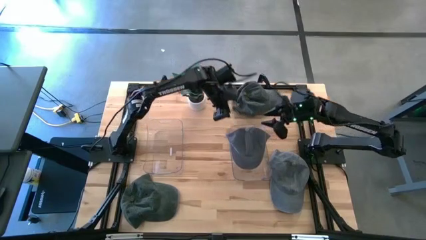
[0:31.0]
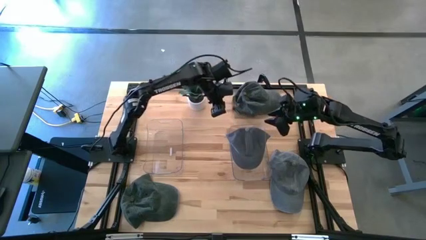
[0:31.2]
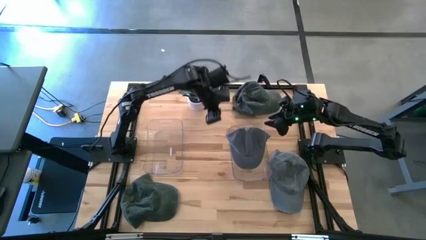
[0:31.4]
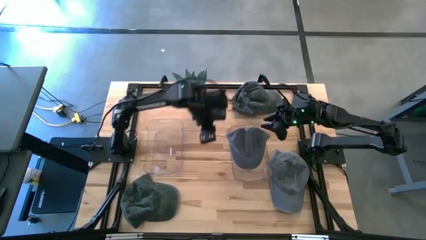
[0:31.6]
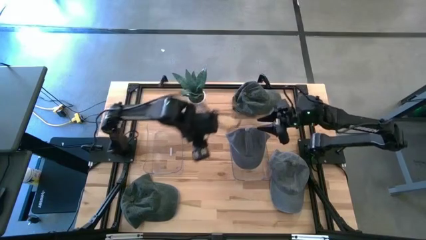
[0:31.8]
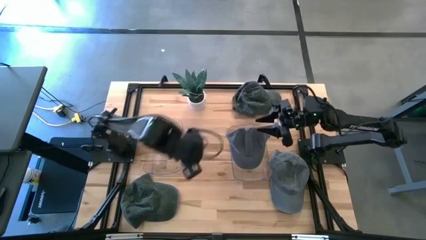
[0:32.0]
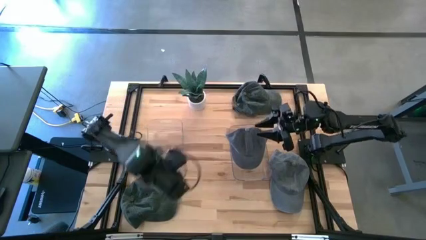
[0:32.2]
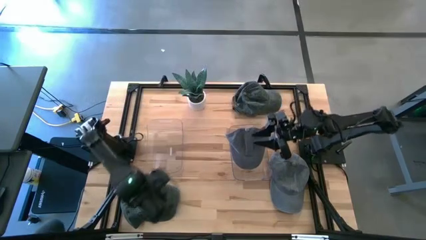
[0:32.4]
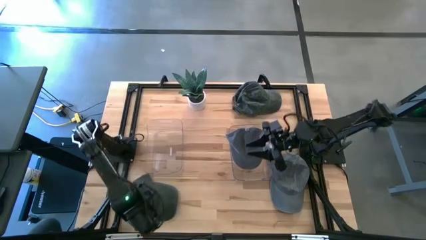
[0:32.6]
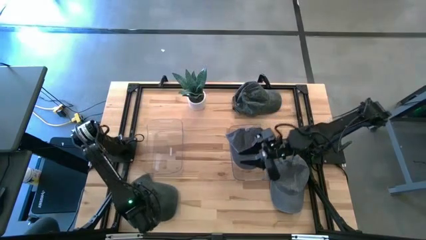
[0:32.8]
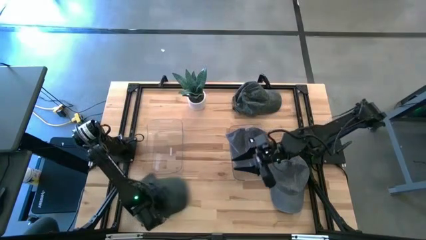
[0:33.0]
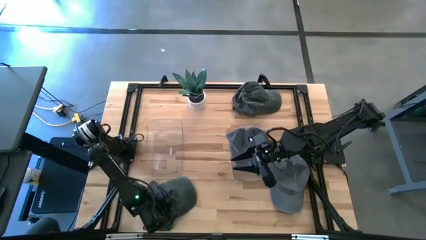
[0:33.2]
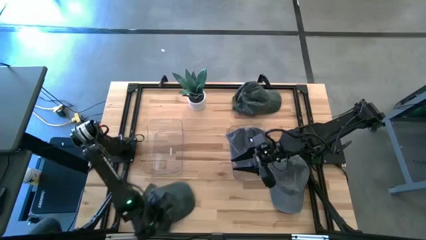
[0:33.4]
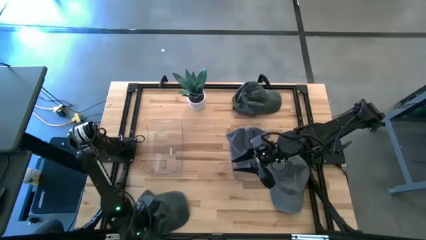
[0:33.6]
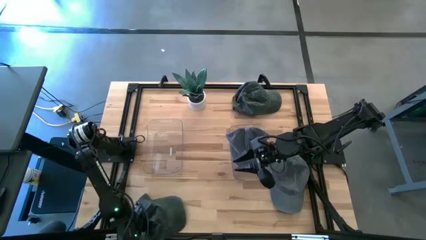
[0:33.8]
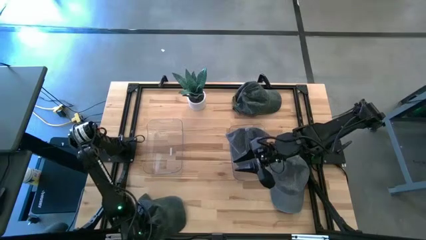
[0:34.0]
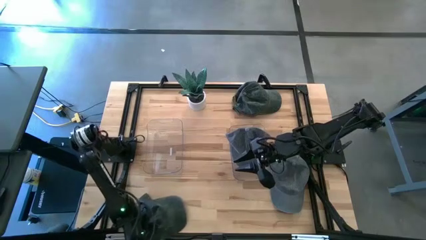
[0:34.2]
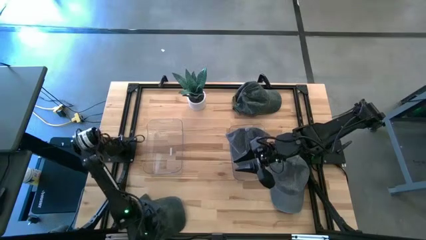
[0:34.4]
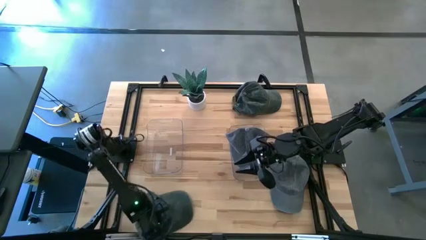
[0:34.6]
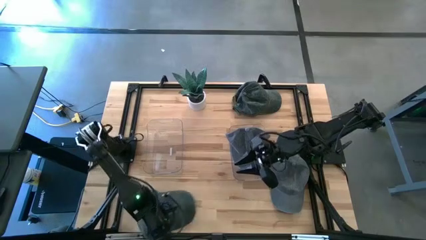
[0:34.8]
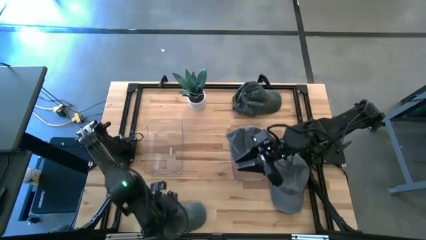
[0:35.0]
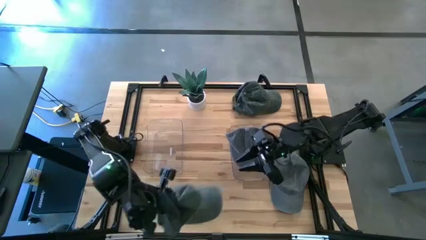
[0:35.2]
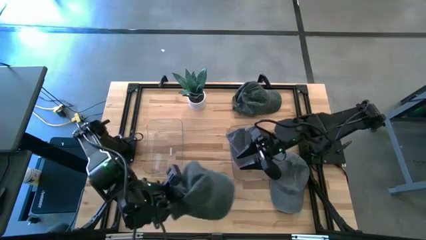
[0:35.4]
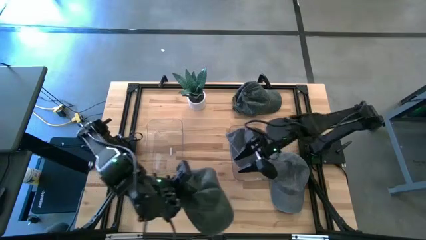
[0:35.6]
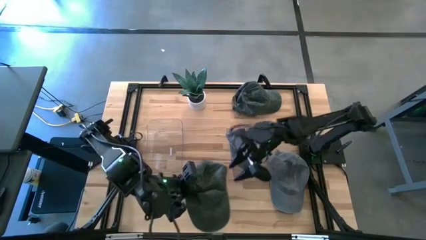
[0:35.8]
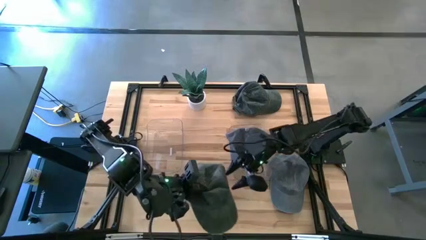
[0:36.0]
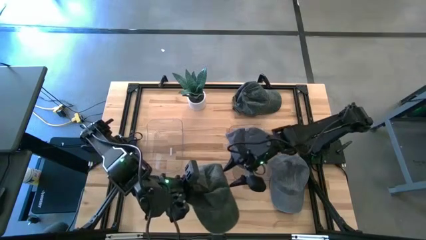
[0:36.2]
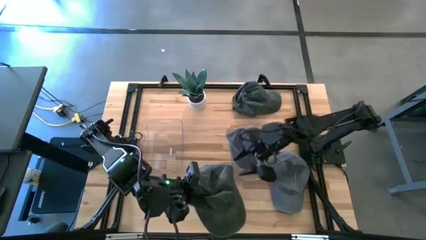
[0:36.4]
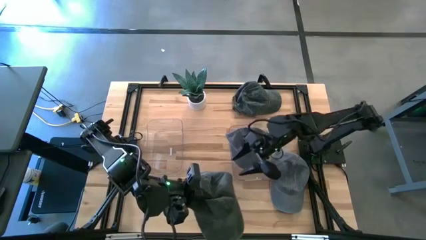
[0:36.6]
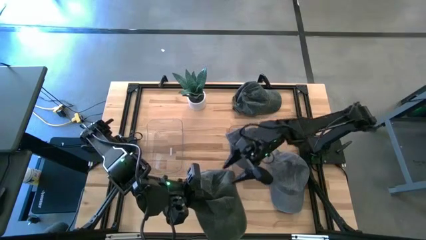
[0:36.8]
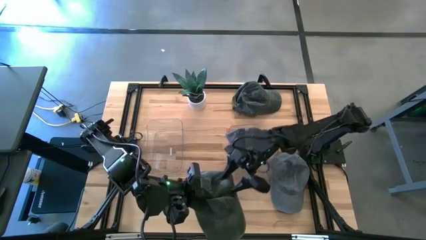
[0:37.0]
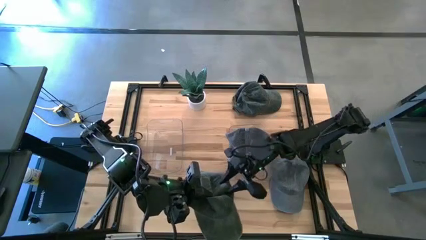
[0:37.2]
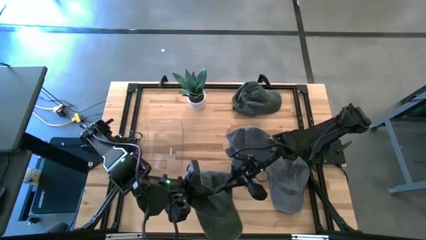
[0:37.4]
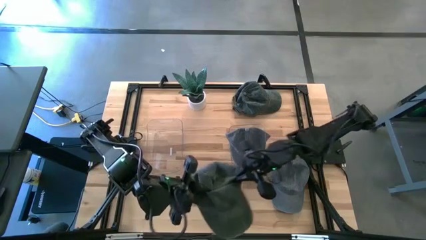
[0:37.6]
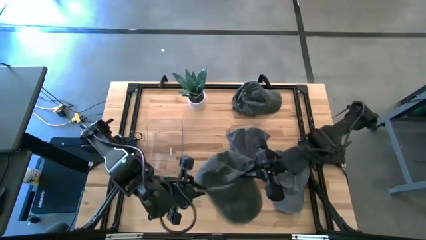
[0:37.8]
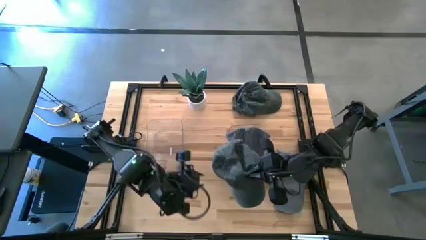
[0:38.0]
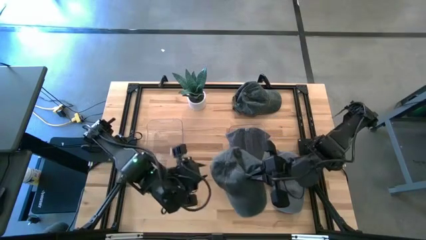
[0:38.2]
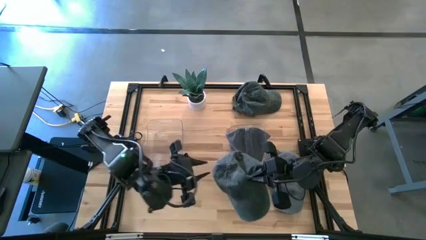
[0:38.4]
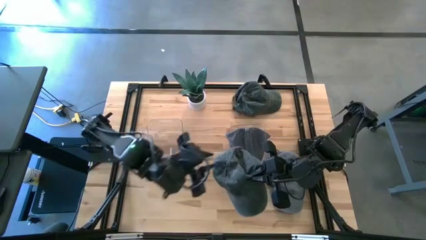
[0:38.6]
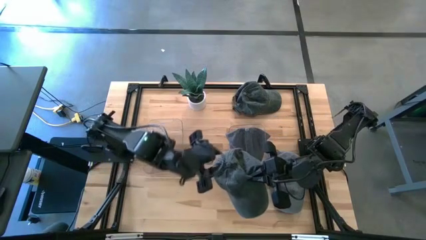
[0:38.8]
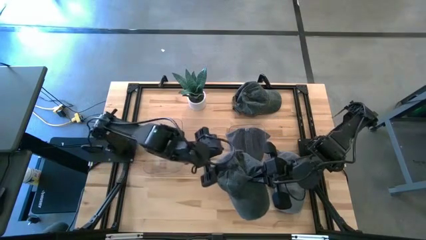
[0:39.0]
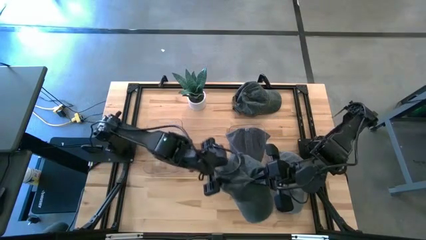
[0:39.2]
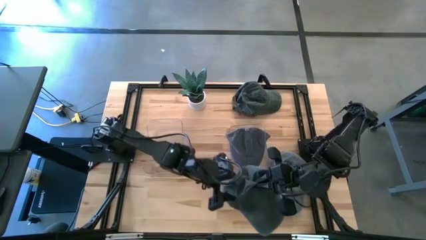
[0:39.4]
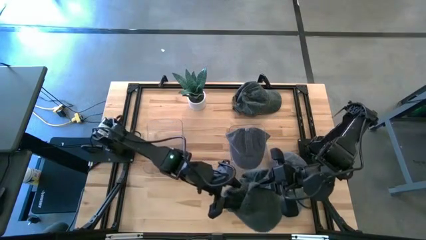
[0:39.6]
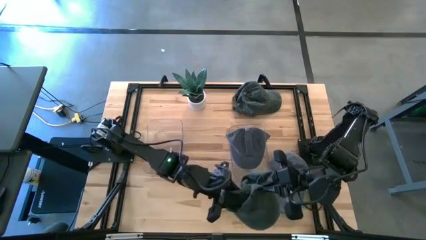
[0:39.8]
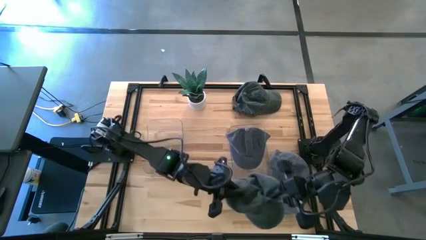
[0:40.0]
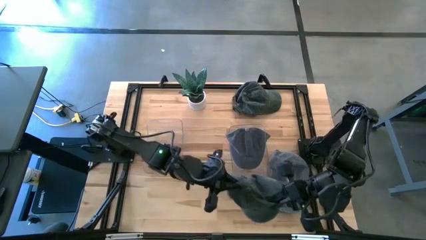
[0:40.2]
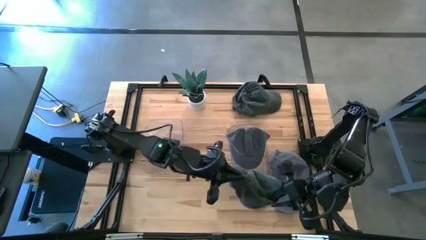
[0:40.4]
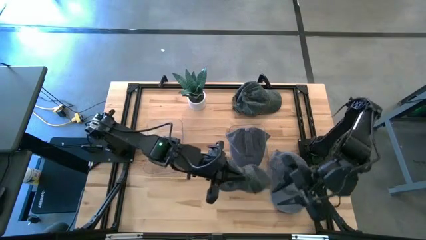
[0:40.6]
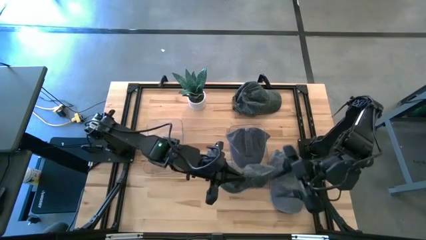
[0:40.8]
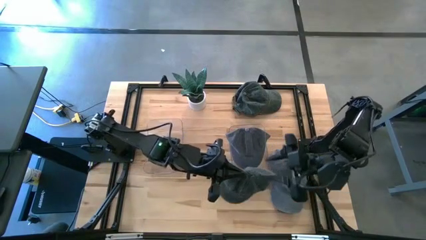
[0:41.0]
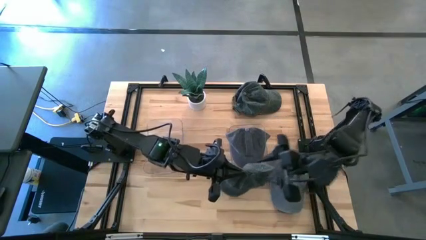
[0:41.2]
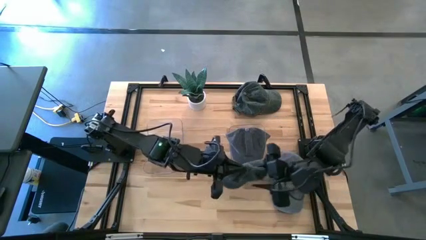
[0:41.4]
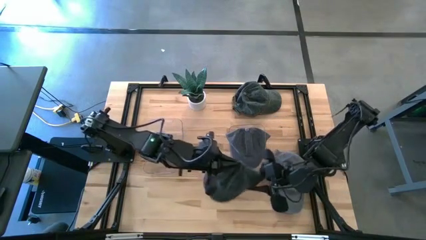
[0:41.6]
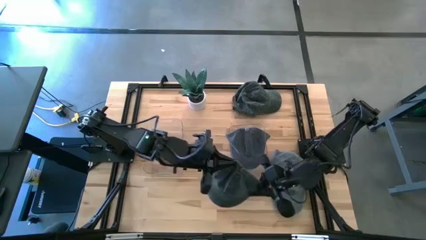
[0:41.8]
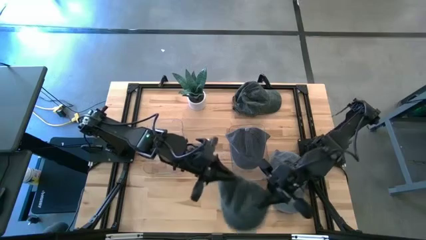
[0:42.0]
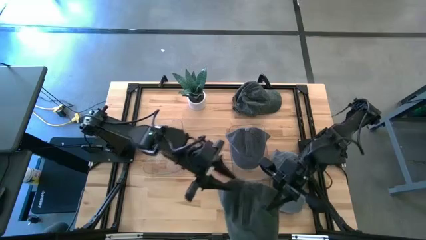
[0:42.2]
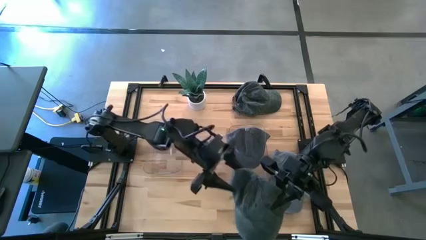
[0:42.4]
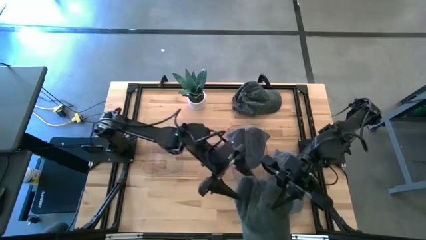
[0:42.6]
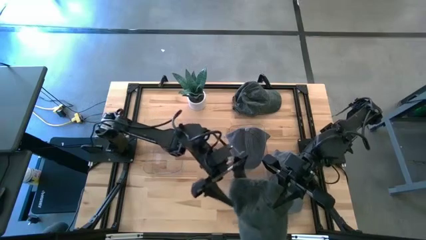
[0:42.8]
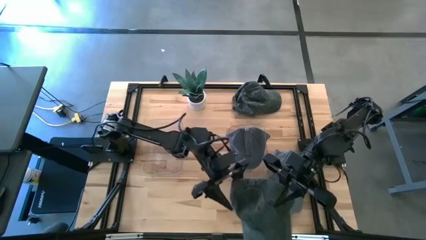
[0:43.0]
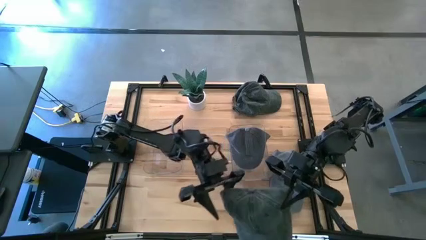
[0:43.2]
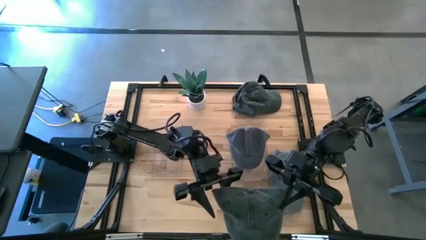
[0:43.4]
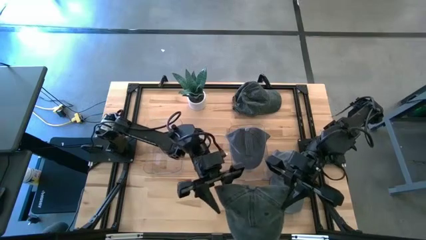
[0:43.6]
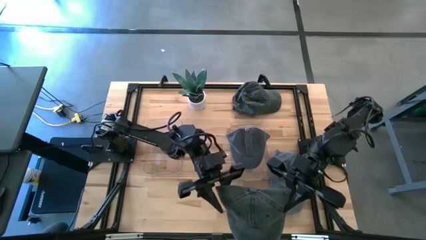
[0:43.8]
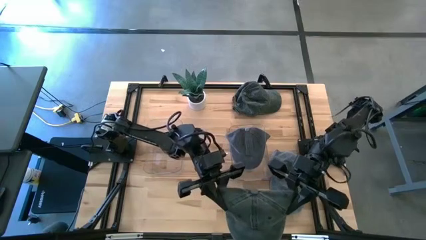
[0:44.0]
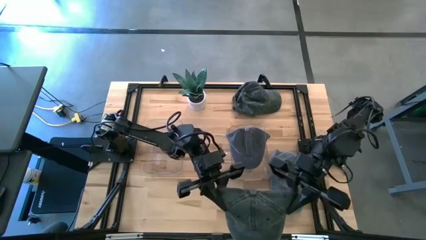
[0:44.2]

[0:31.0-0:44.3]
Task: Pick & Place hat
Put the green cap into the left transparent bin

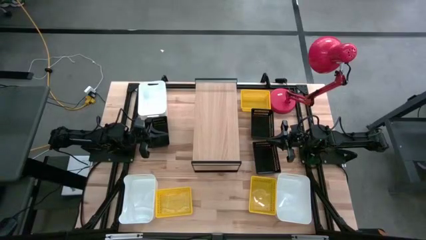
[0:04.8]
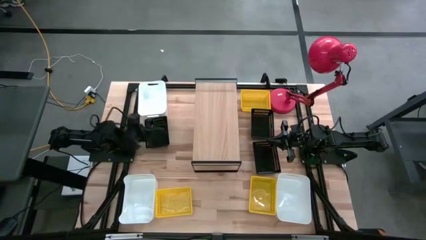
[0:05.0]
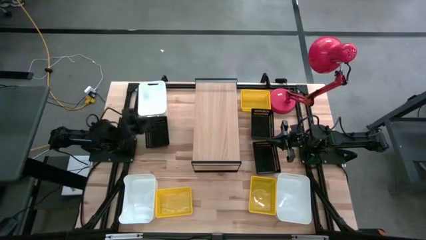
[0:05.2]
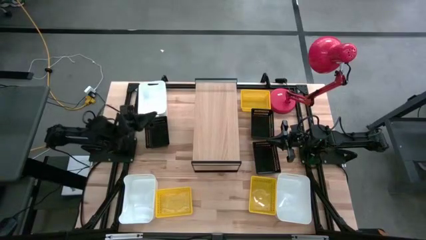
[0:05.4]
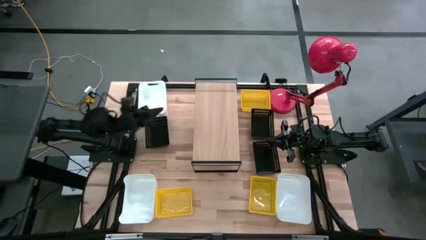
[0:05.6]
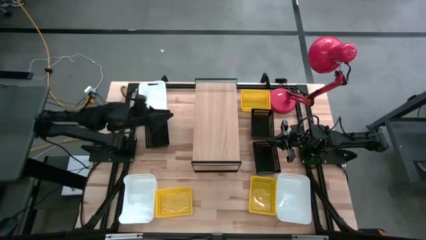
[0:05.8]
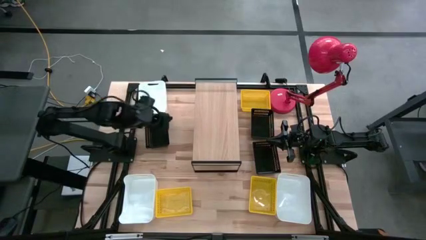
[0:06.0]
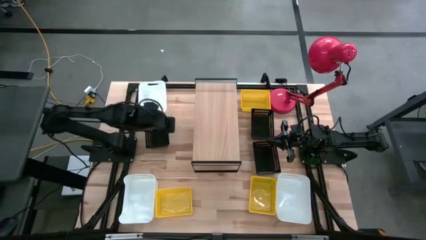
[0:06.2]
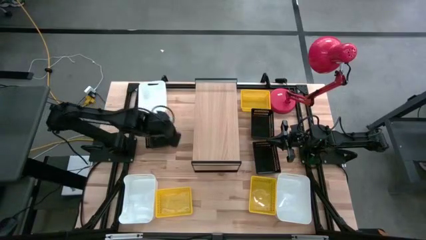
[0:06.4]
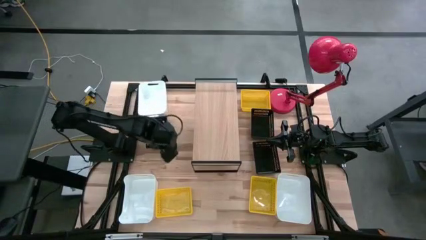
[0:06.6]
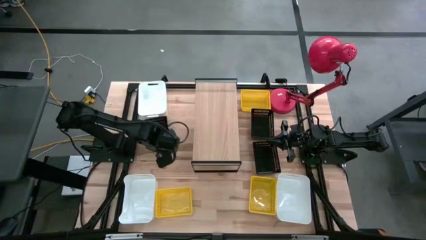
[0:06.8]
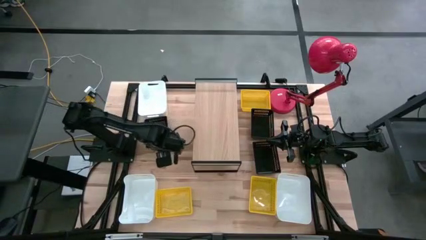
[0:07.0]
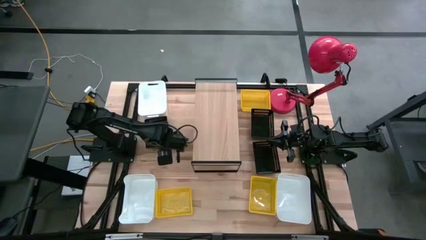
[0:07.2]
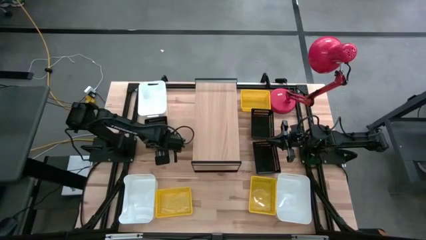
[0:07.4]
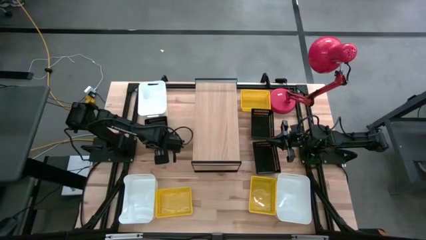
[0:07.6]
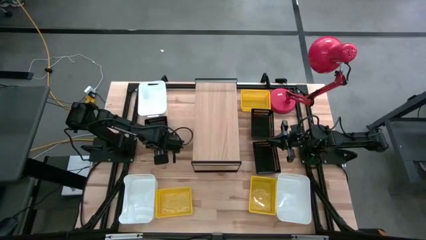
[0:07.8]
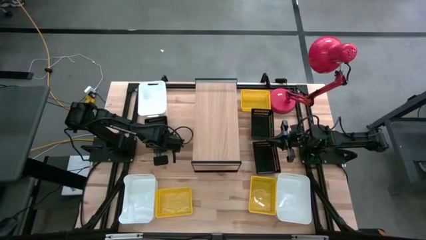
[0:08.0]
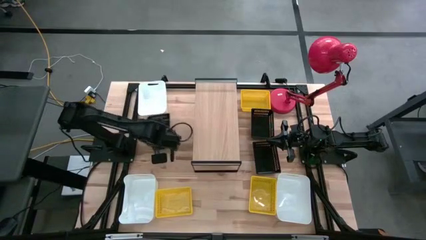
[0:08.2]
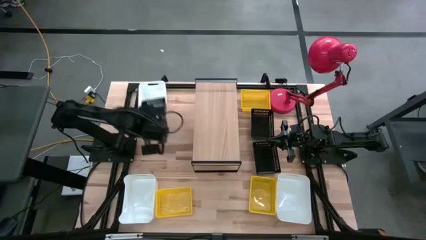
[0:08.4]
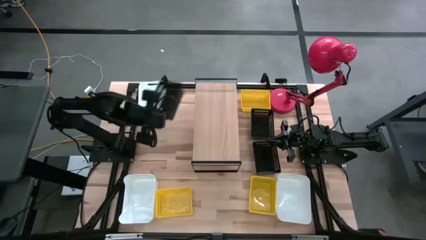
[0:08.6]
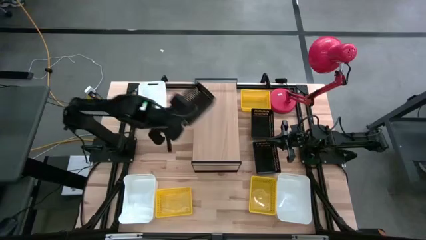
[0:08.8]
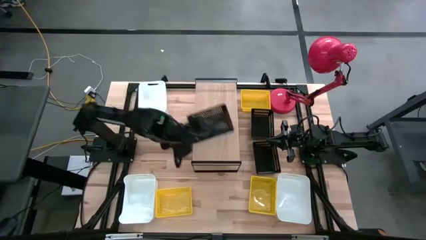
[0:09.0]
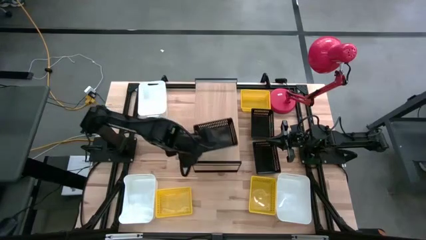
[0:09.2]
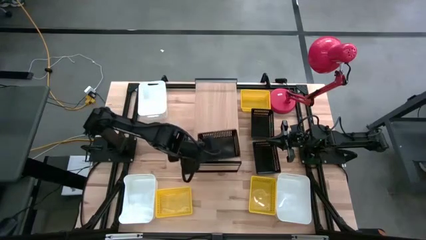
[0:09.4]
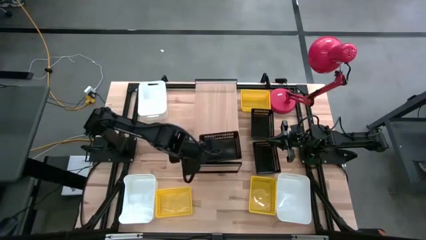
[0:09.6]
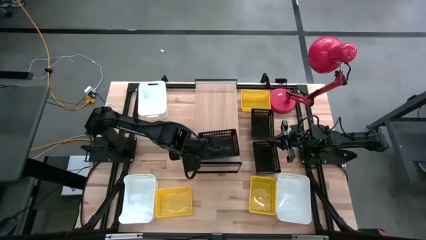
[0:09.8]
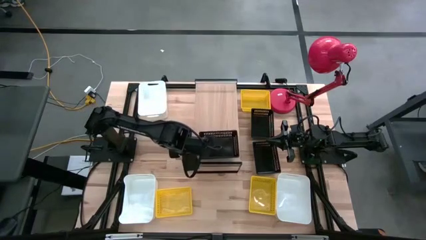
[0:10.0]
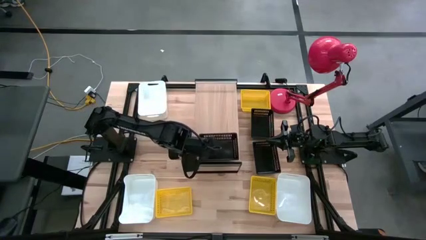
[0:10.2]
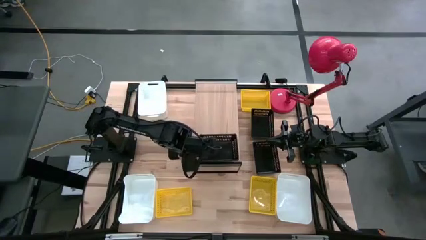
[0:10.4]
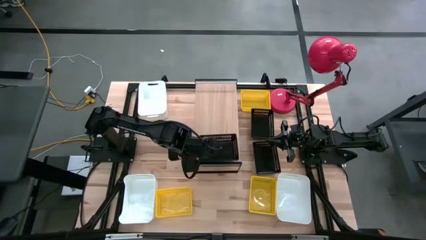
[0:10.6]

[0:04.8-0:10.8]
Task: Stack baskets on shelf by color
Put the top left black bin on the shelf
